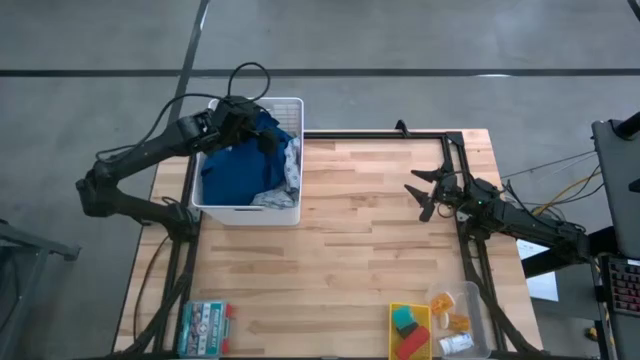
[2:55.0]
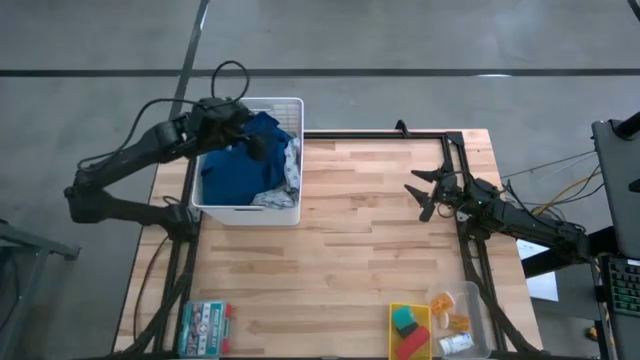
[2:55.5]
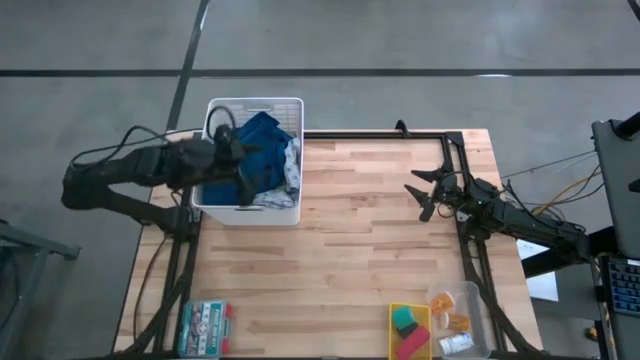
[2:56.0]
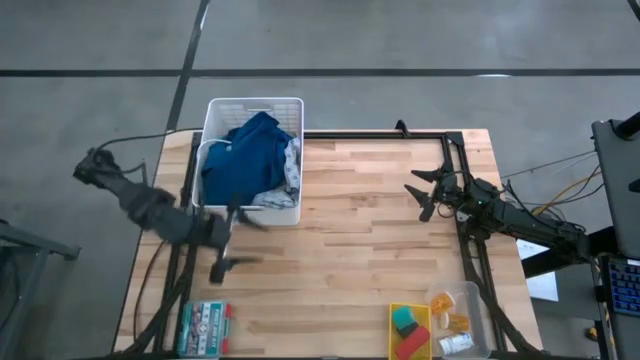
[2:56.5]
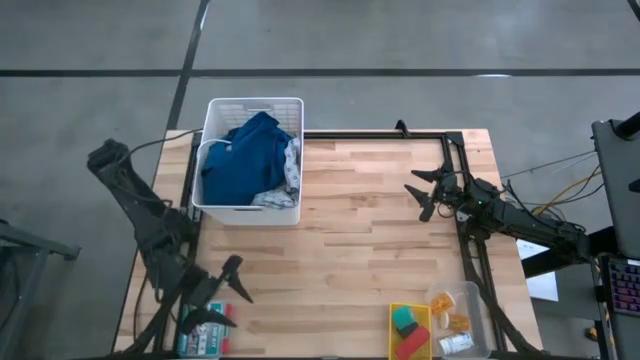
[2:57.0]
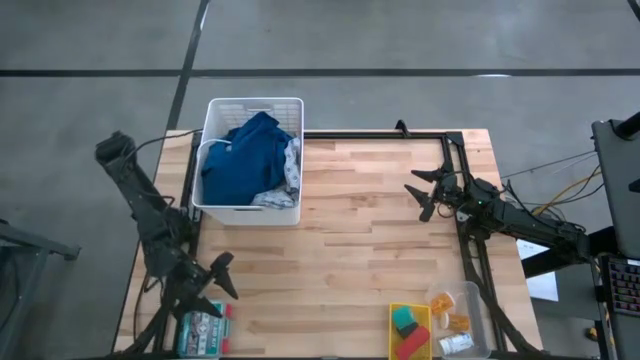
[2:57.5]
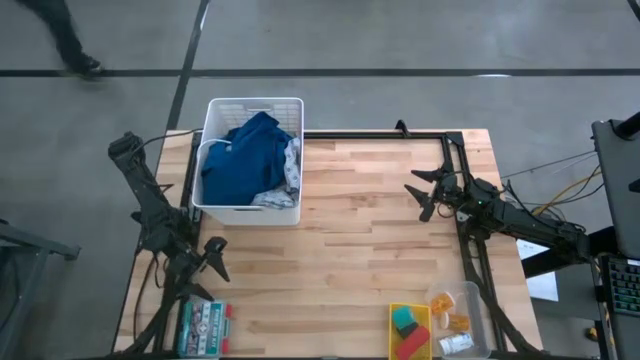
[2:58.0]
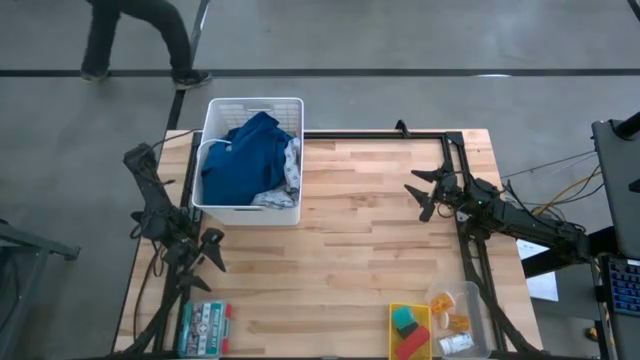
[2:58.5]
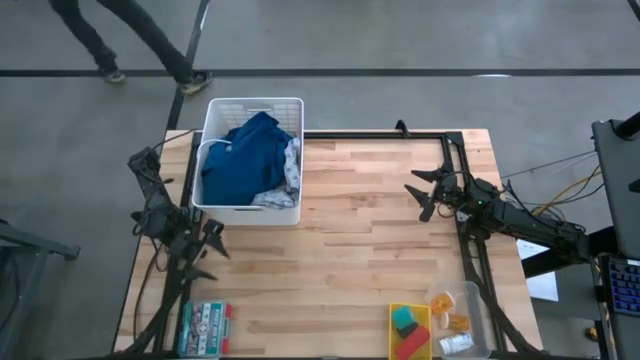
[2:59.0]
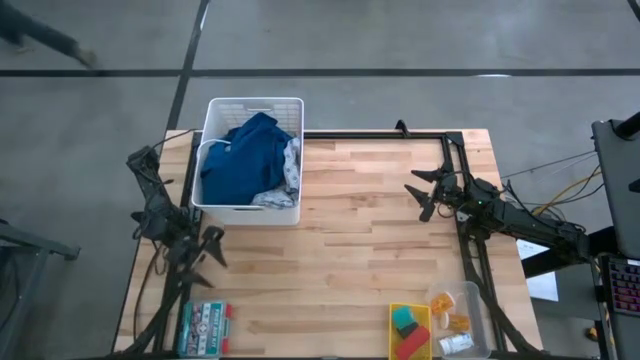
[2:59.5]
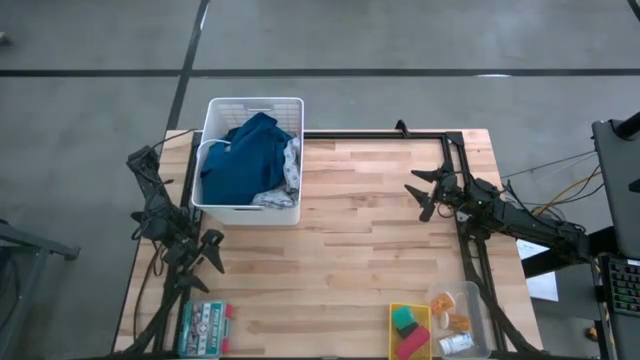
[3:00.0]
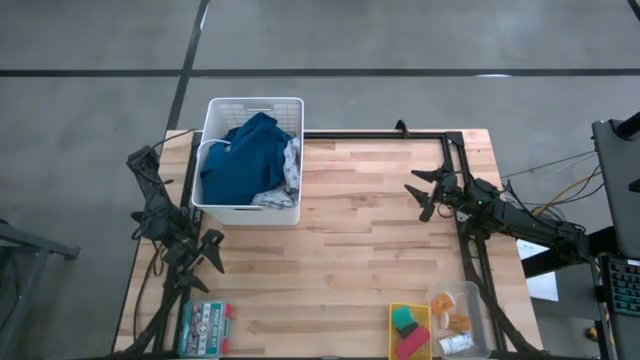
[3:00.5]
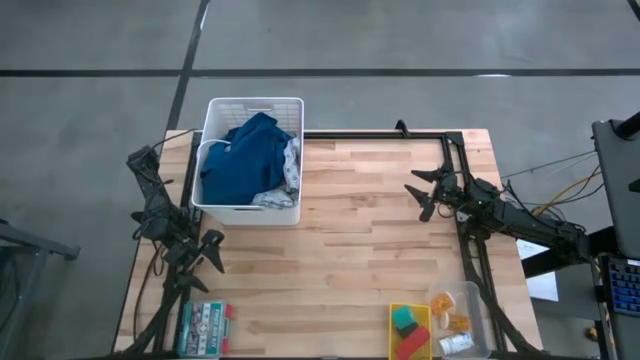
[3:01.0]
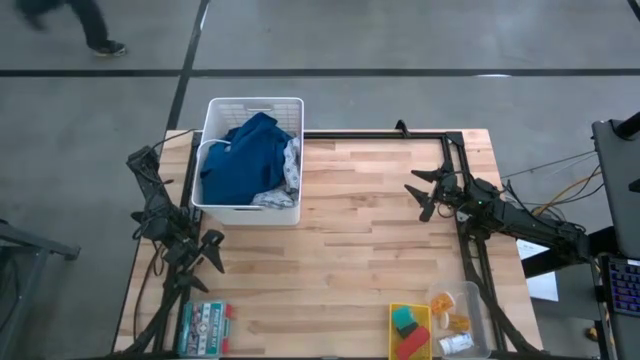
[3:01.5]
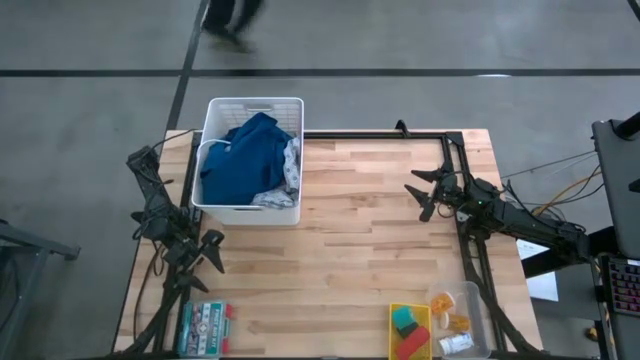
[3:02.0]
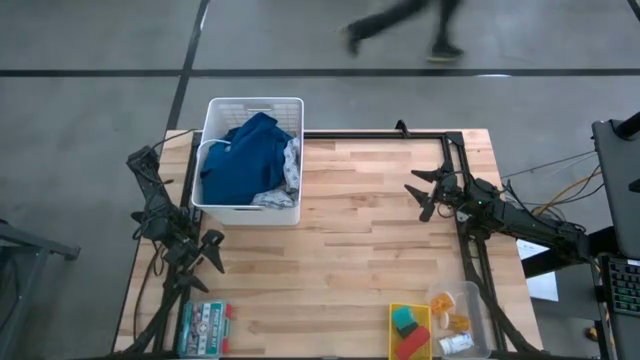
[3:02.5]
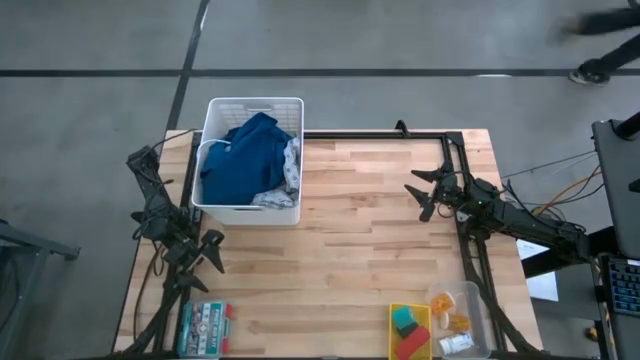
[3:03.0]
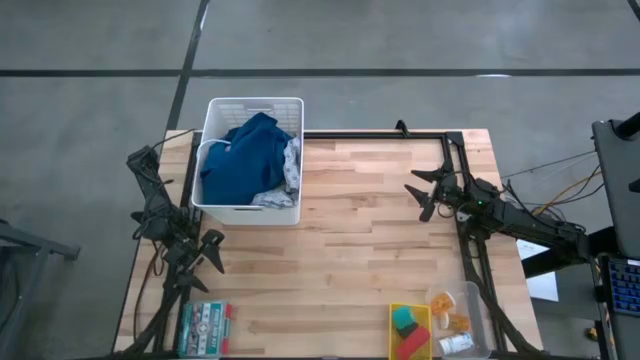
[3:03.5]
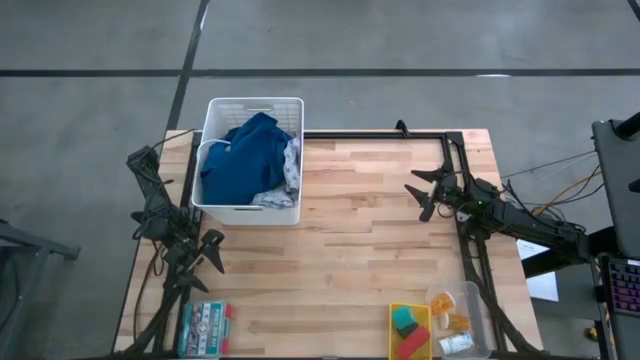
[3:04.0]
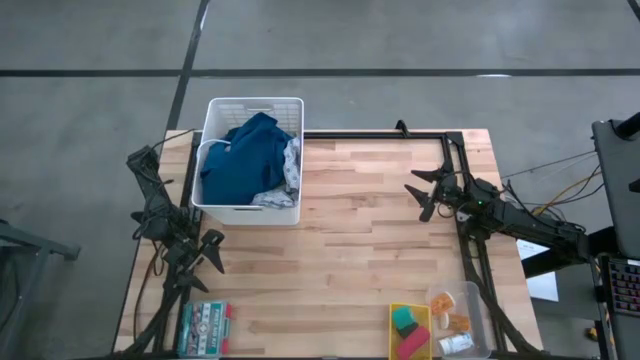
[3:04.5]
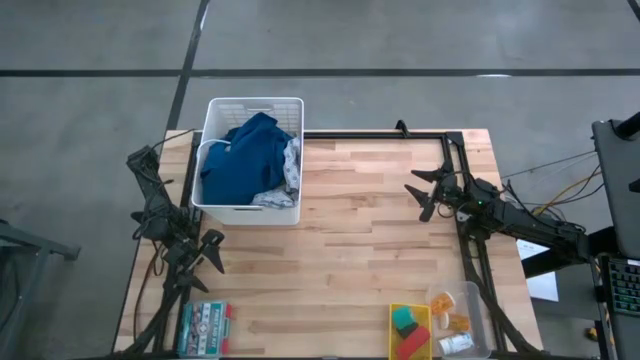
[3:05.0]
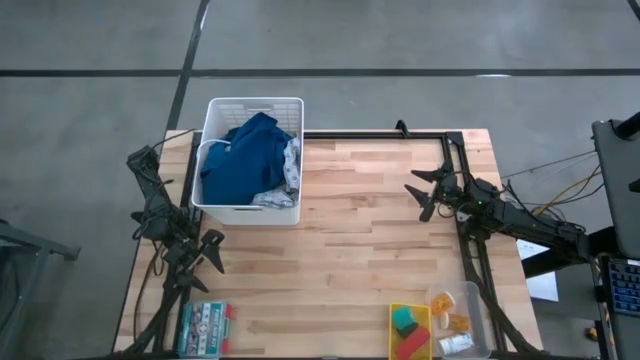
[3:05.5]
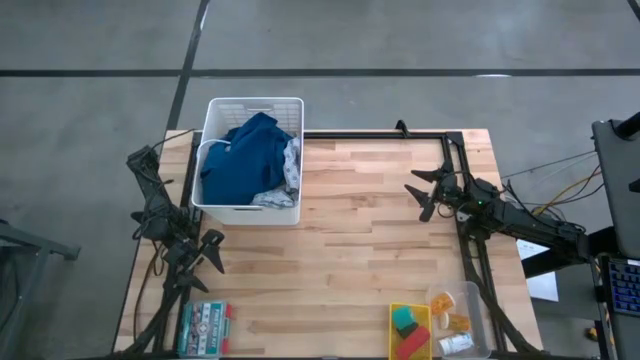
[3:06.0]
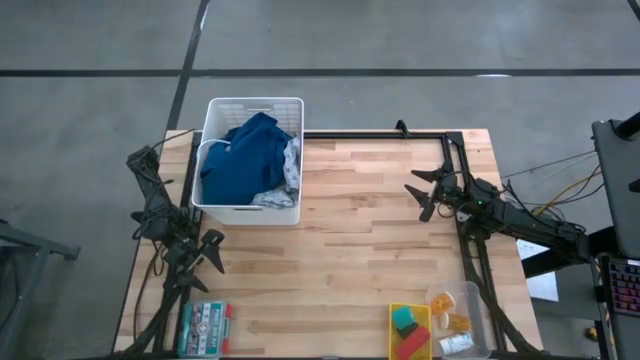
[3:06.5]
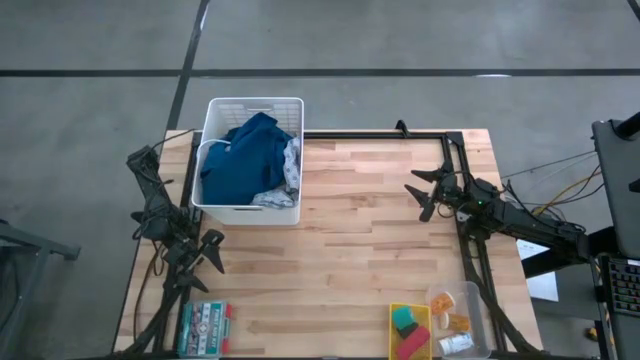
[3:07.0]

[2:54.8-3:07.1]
Task: Pick & Place Medicine items
Return to Home Position

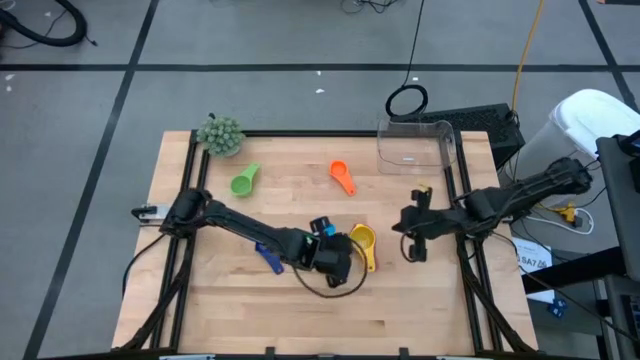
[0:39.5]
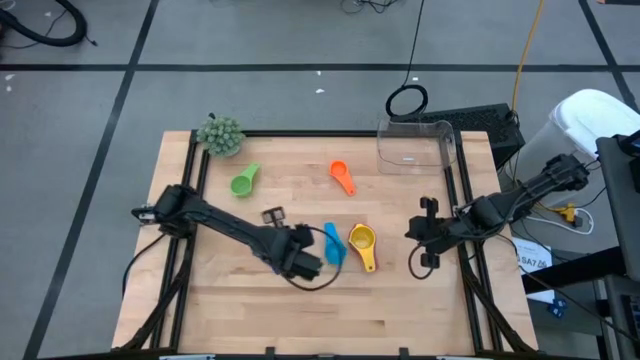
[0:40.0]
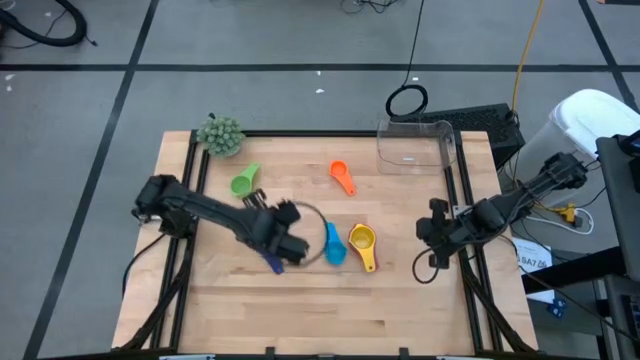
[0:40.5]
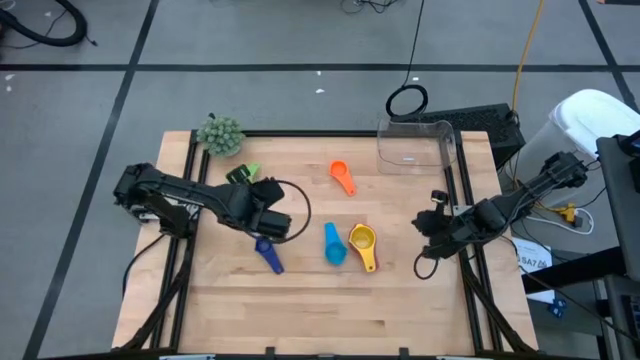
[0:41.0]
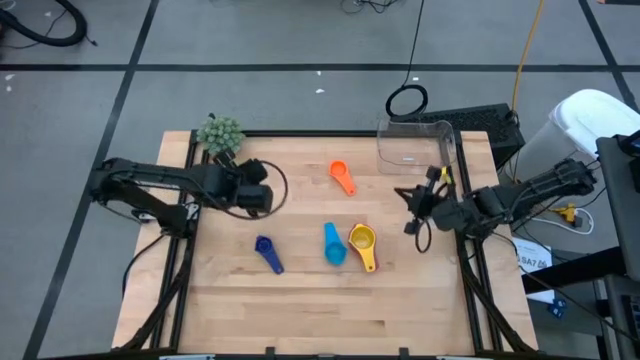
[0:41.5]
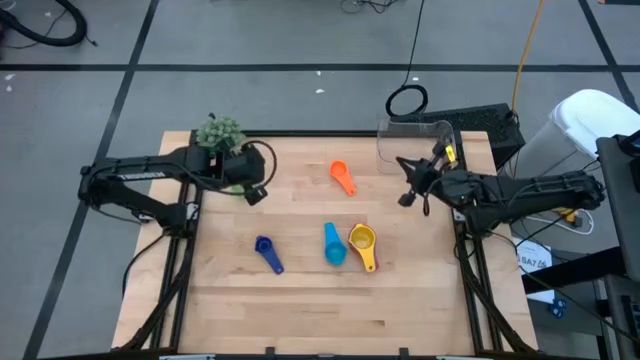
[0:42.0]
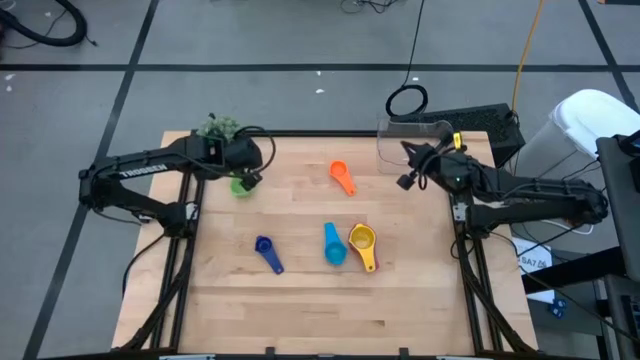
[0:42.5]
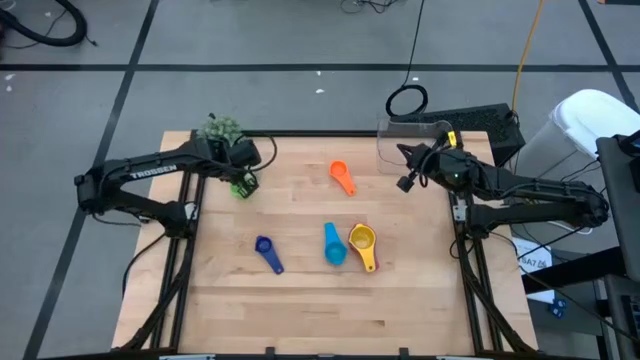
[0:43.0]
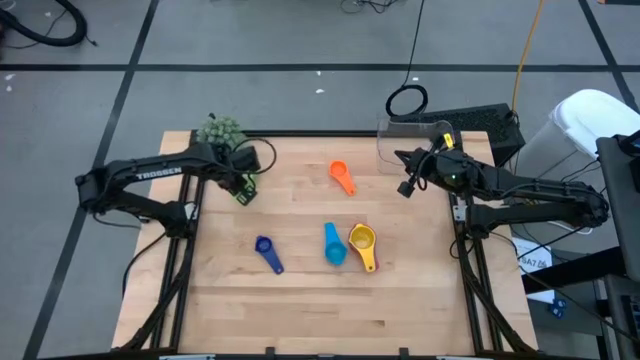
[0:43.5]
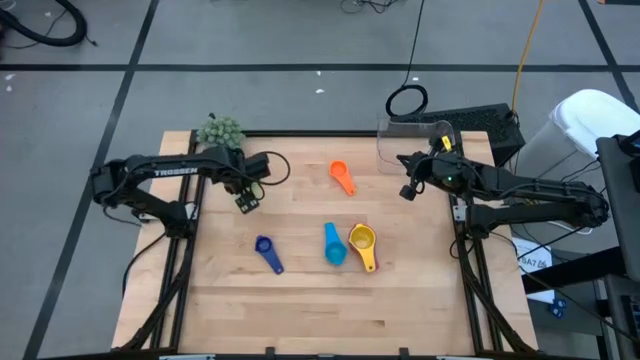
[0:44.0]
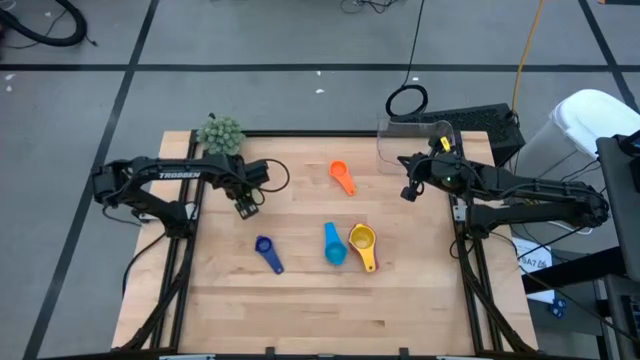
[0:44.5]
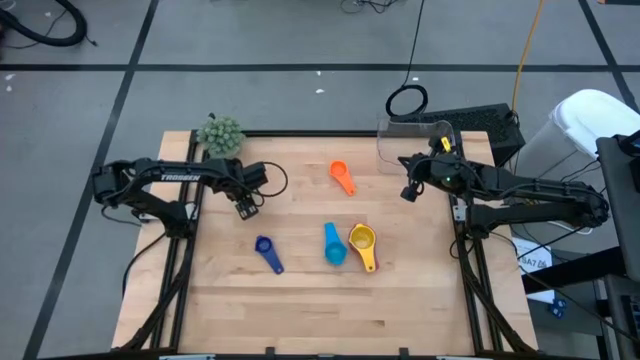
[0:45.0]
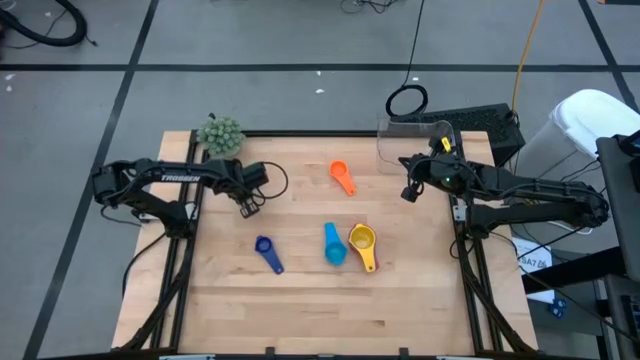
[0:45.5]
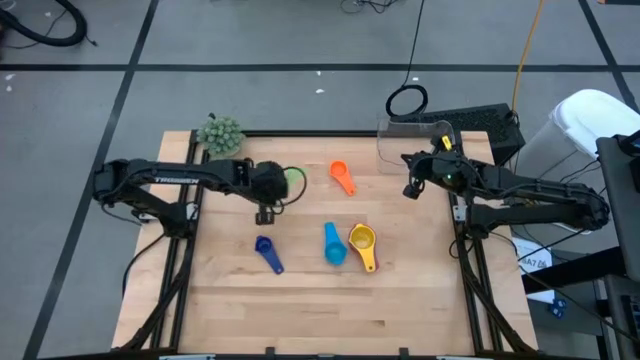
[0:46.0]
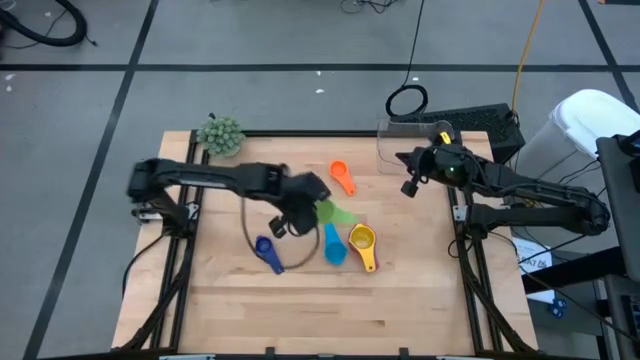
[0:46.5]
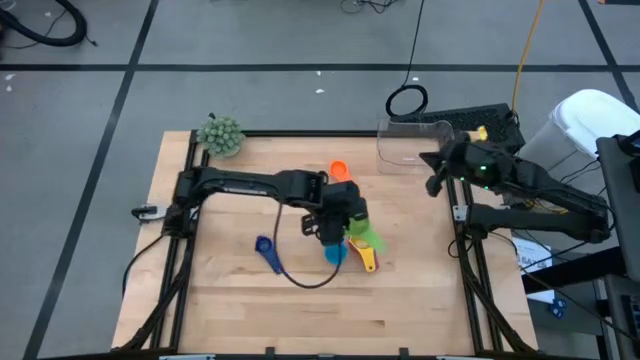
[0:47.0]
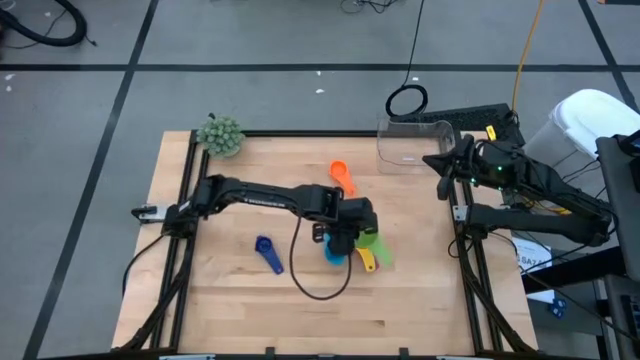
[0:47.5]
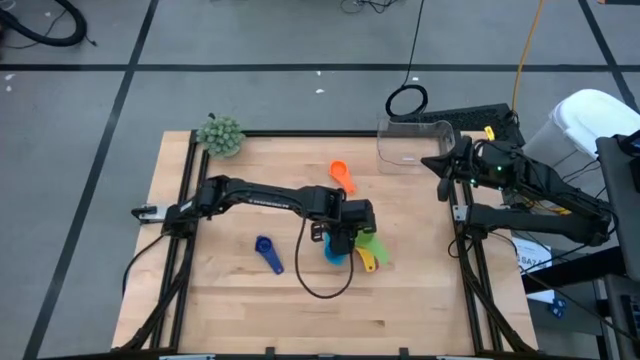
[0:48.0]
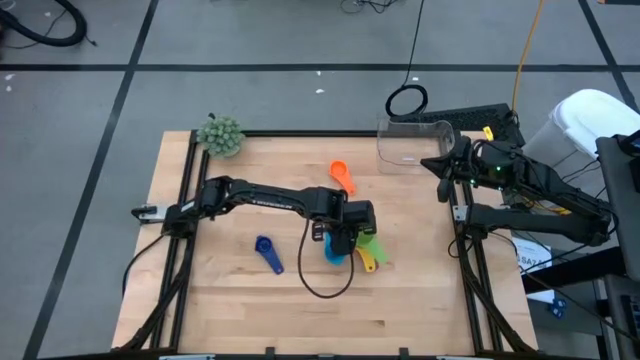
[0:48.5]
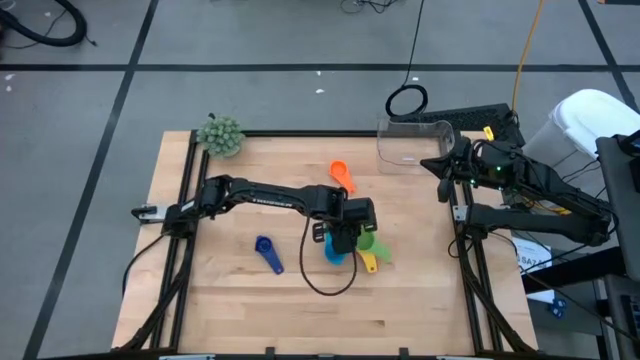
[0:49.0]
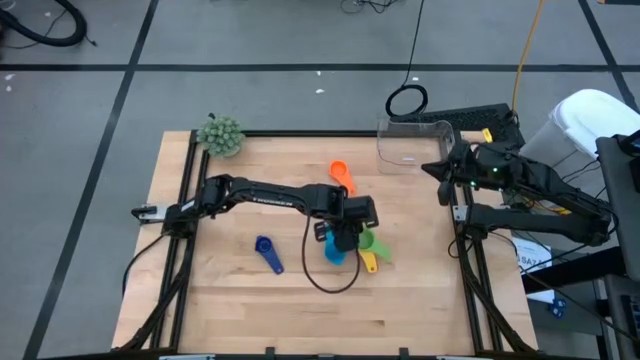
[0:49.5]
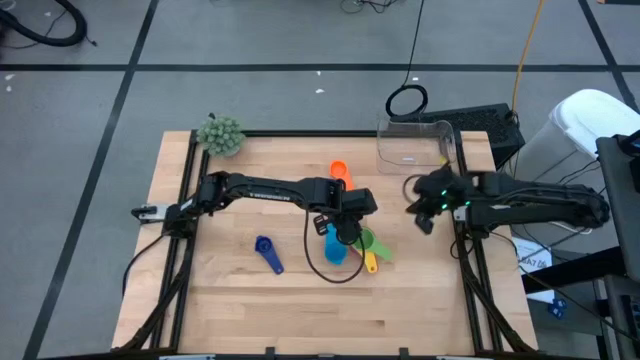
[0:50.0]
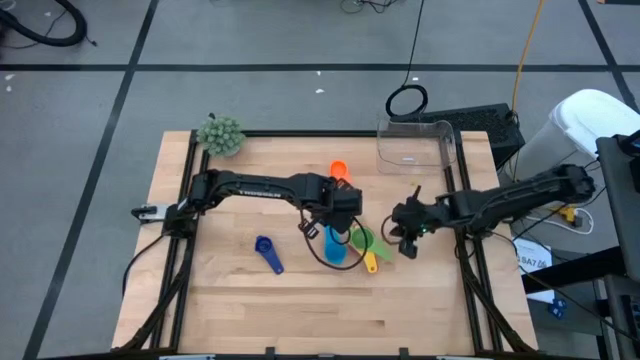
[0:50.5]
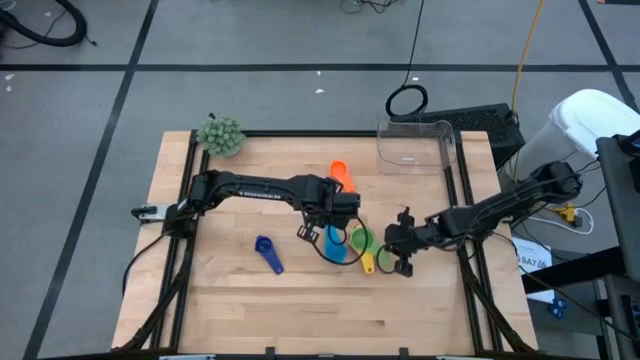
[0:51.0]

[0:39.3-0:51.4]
Task: Nest measuring cups in basket
Stack the green measuring cup on top of the yellow measuring cup
